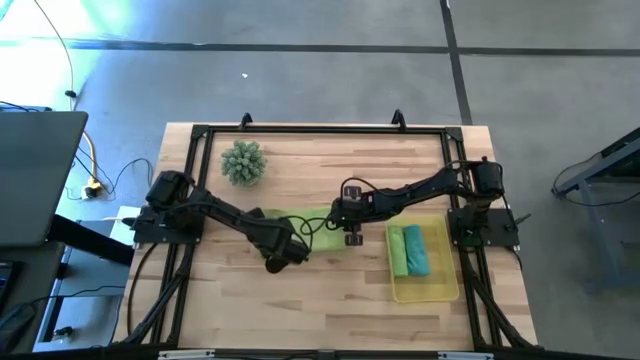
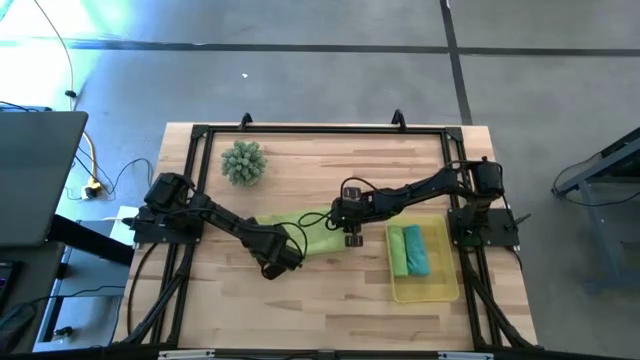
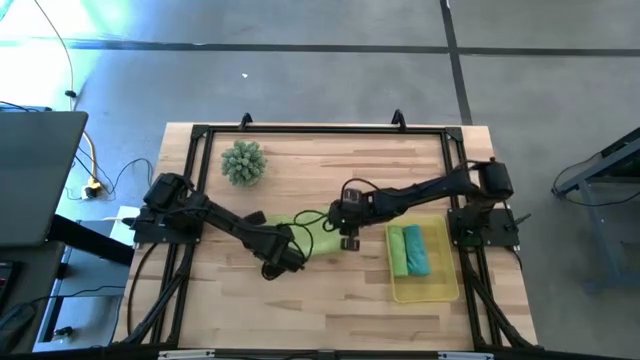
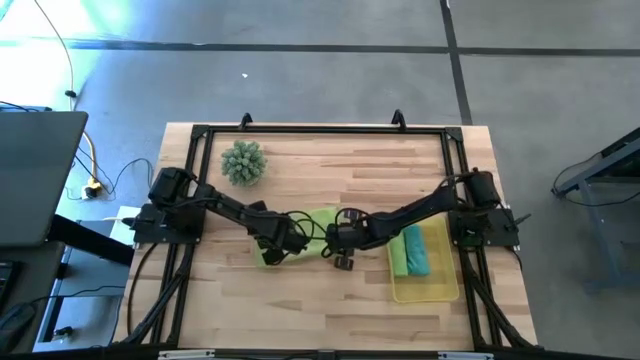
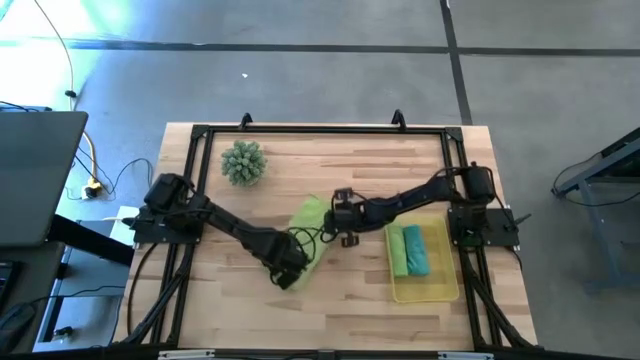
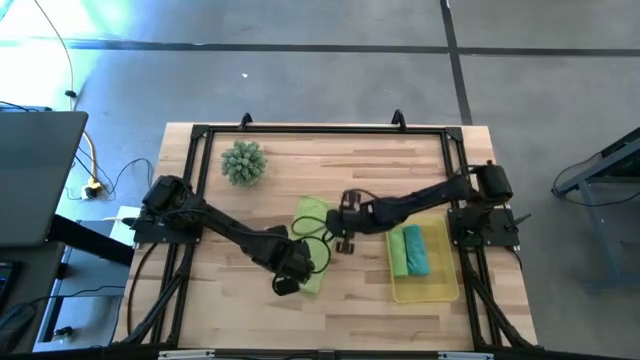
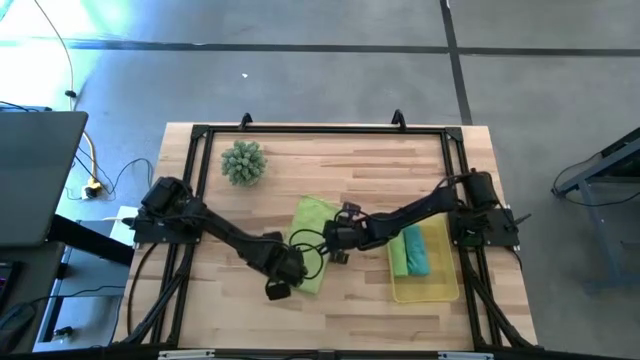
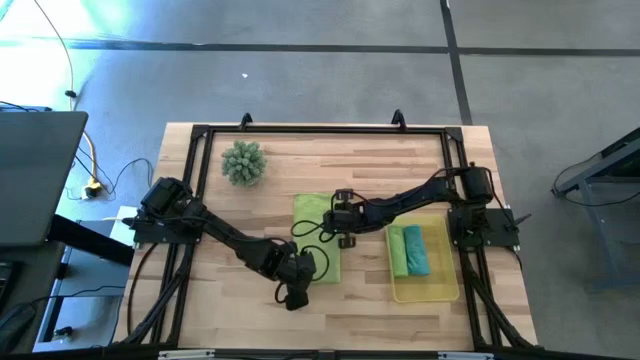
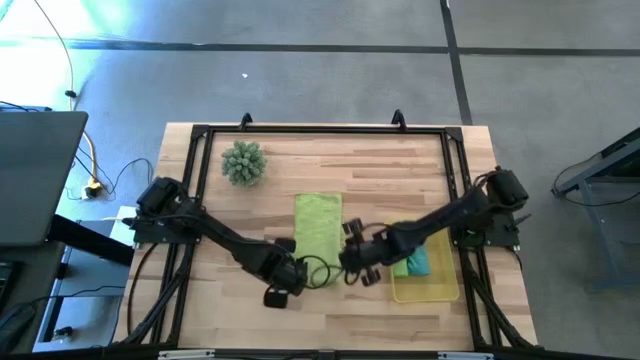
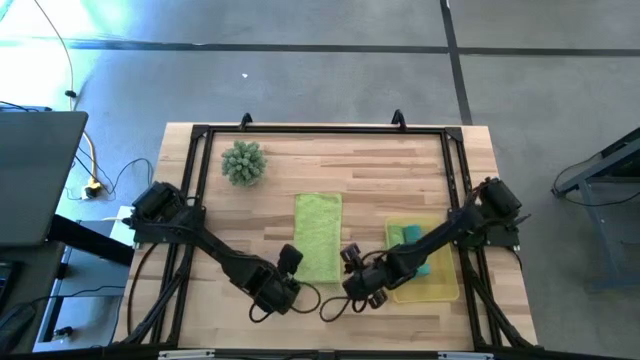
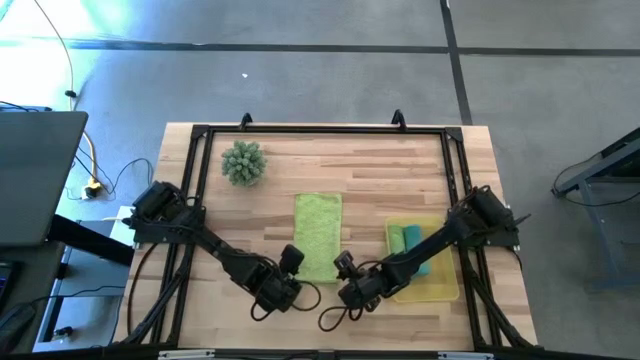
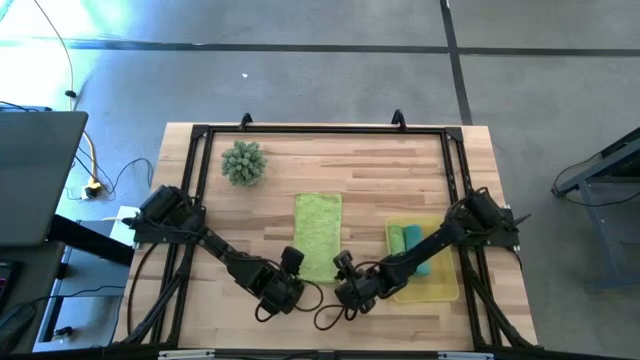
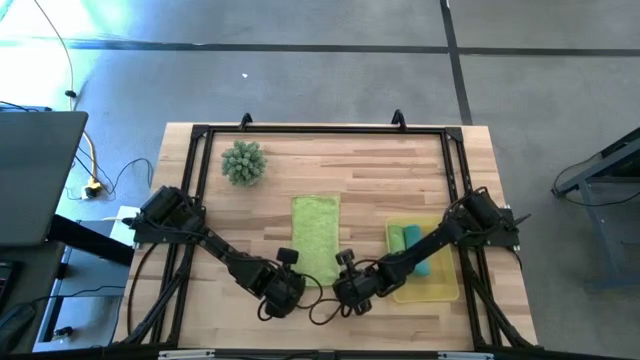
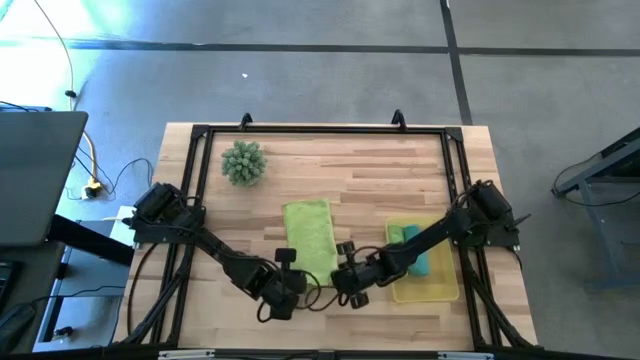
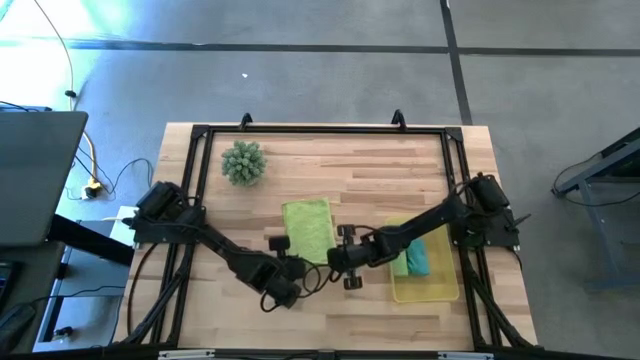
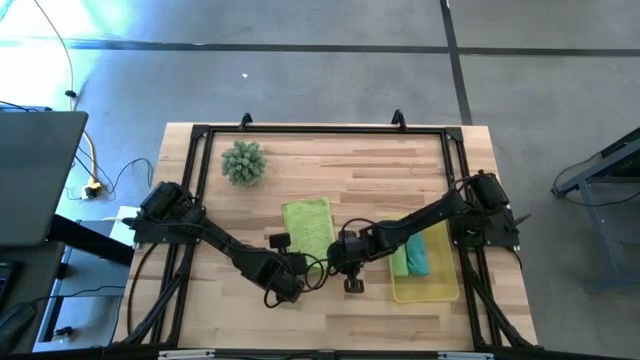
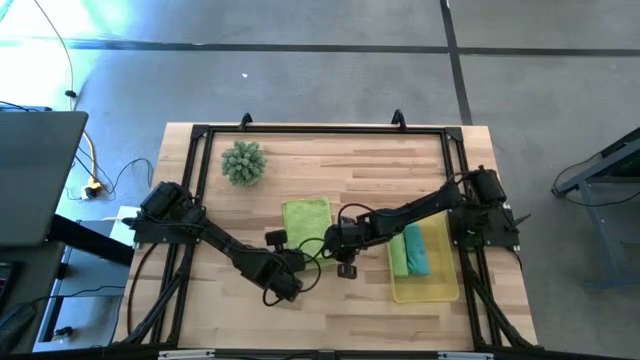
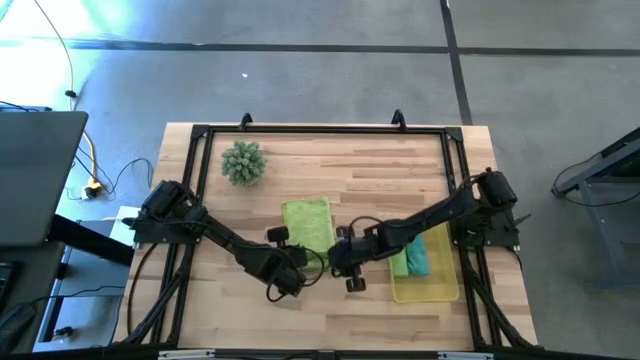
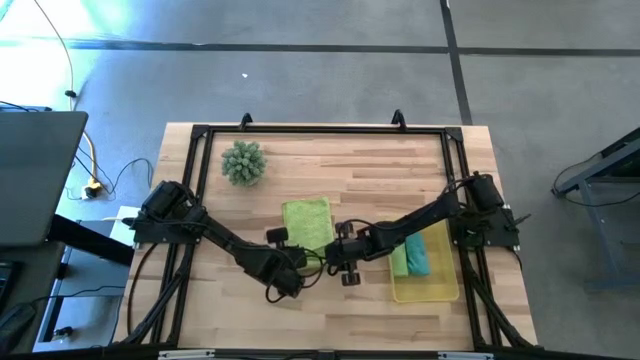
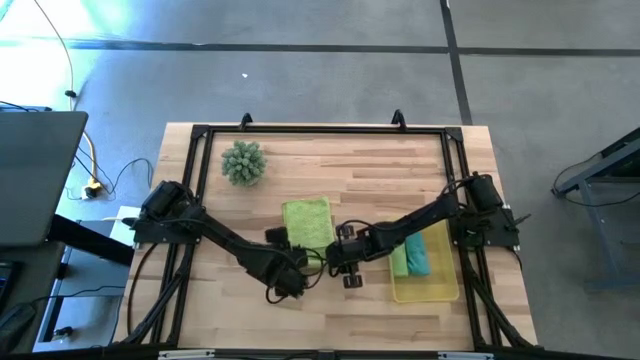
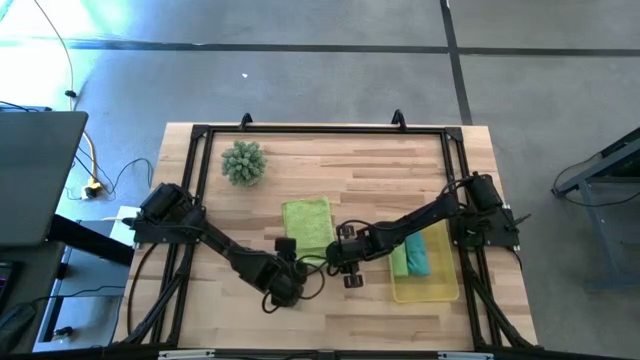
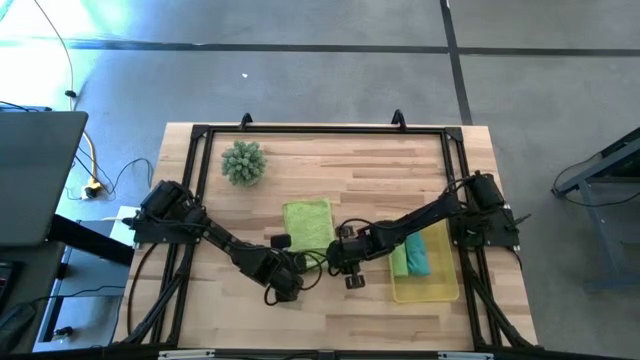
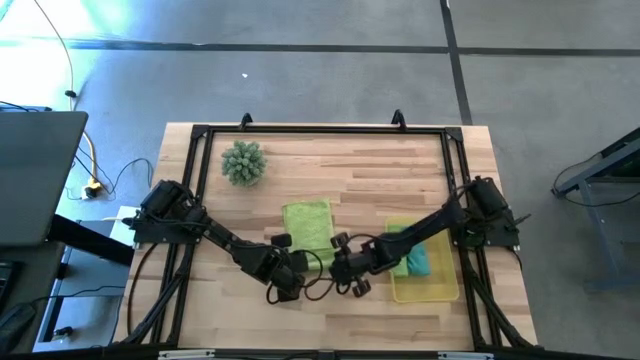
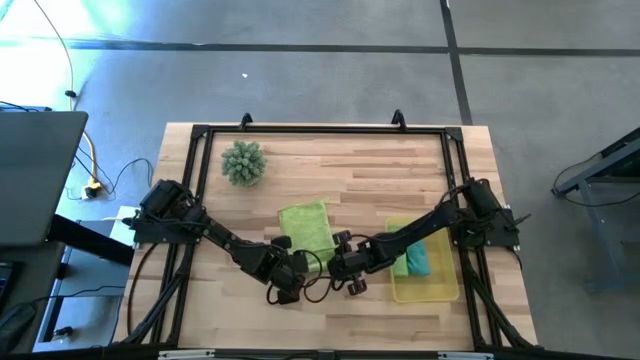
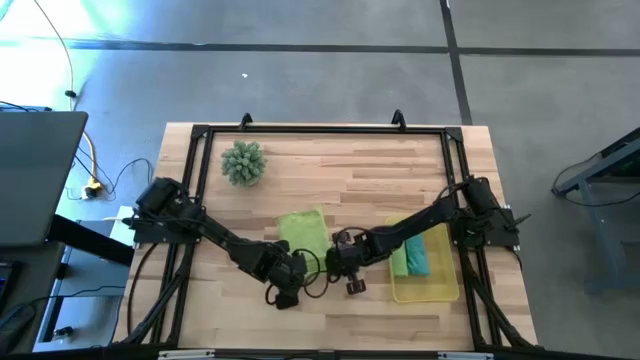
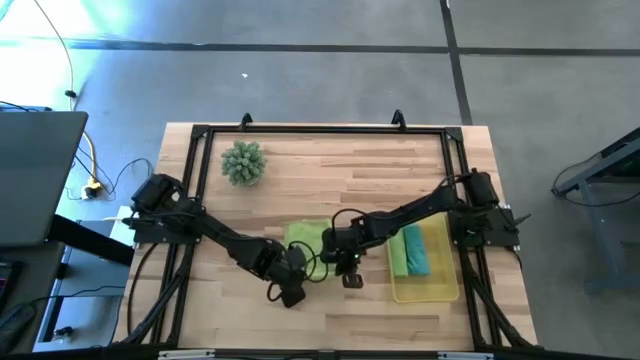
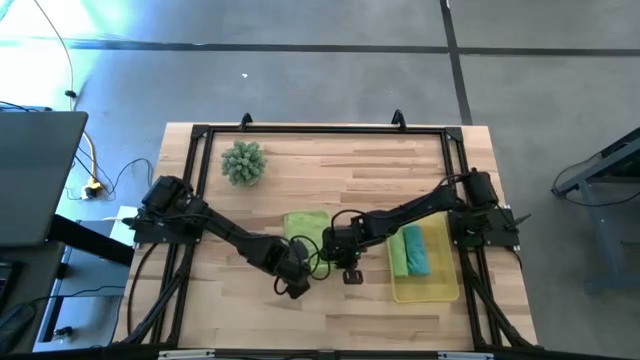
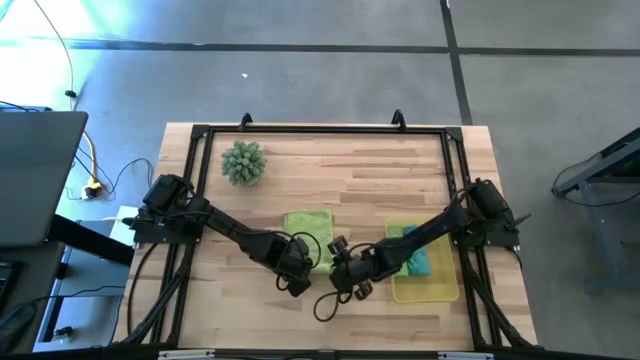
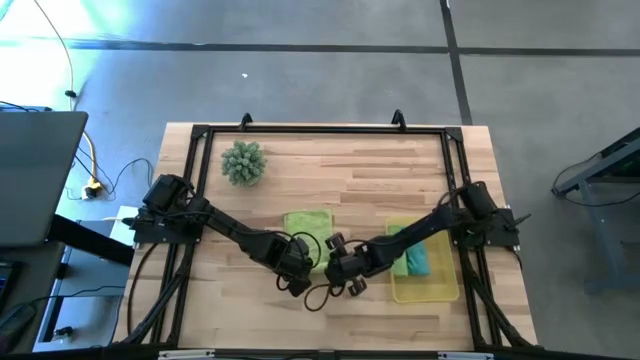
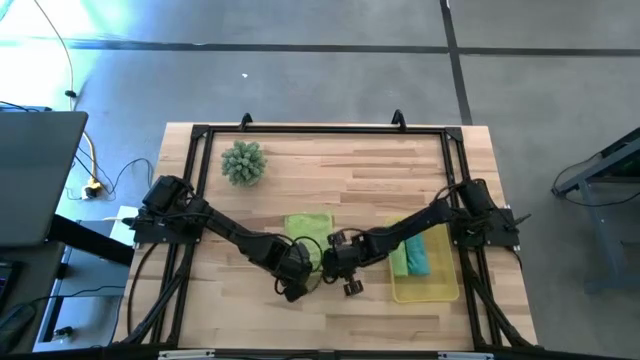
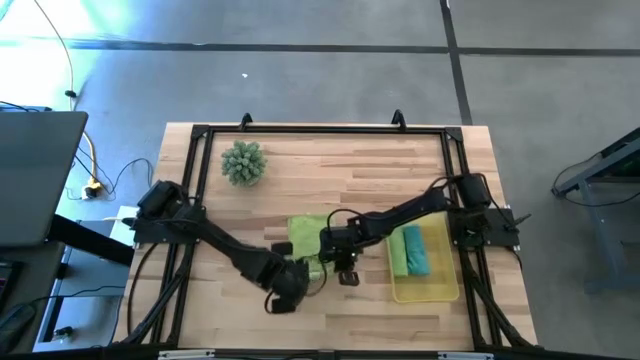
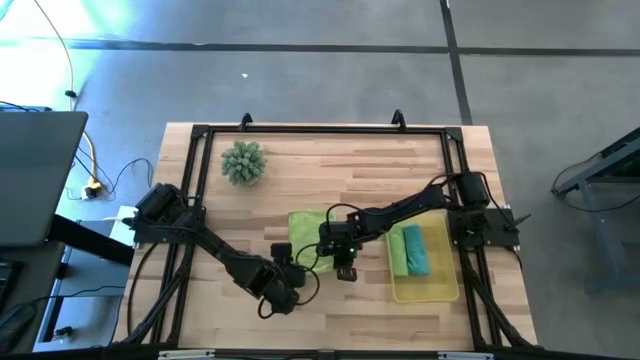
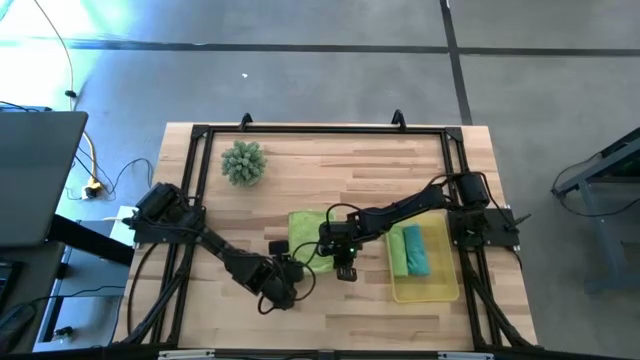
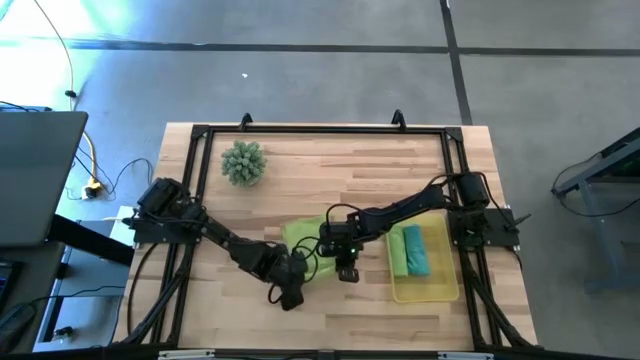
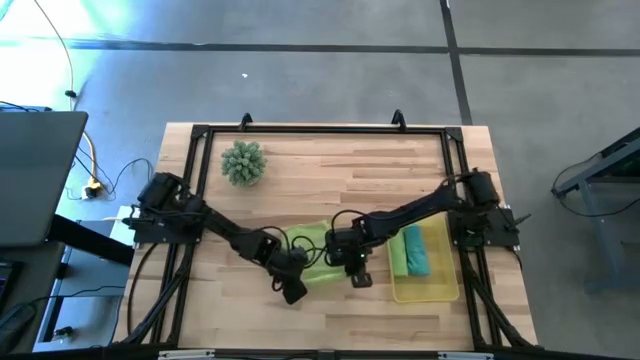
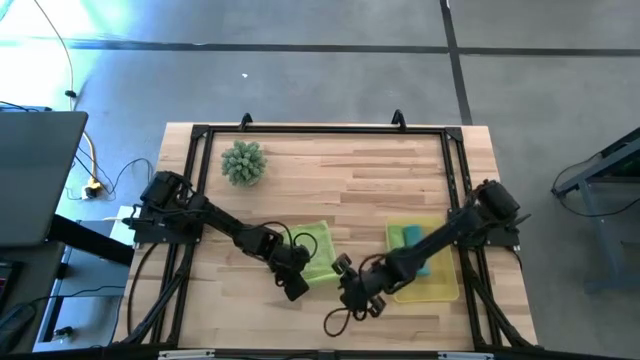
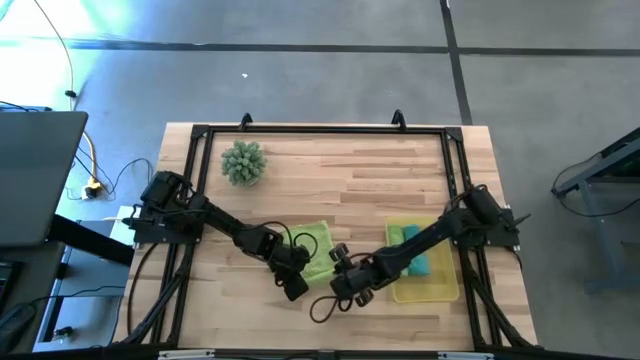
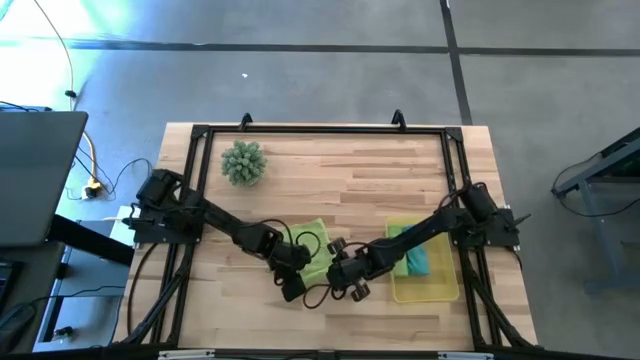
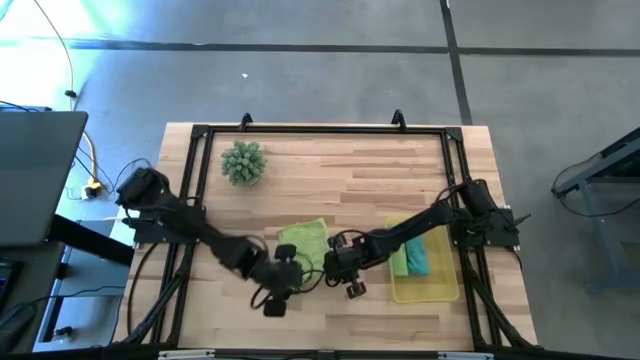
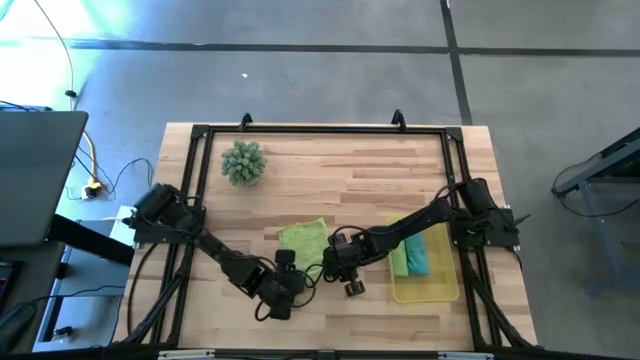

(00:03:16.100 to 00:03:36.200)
Task: Roll microfiber towels into tight, uniform cylinder then place into a basket
Roll the light green cloth

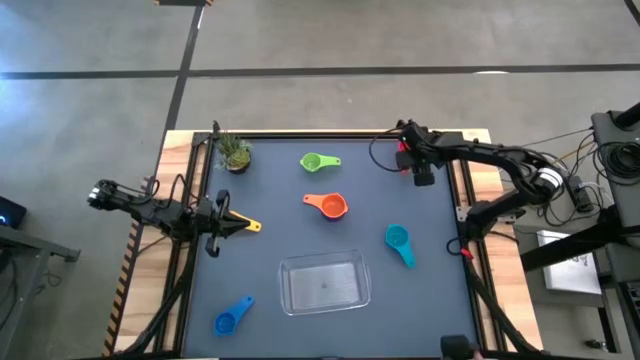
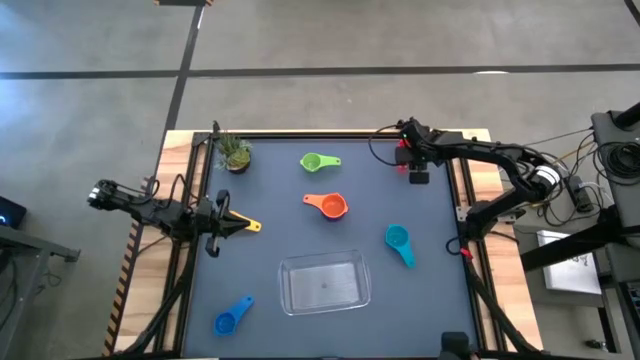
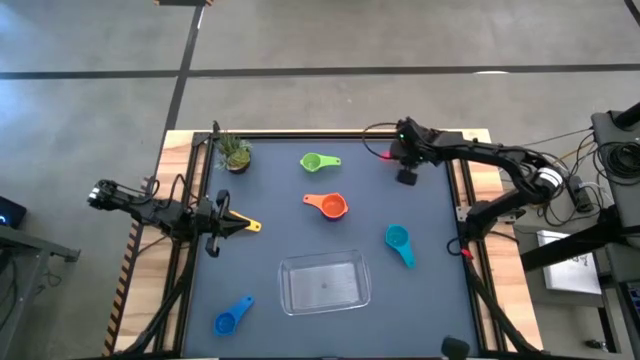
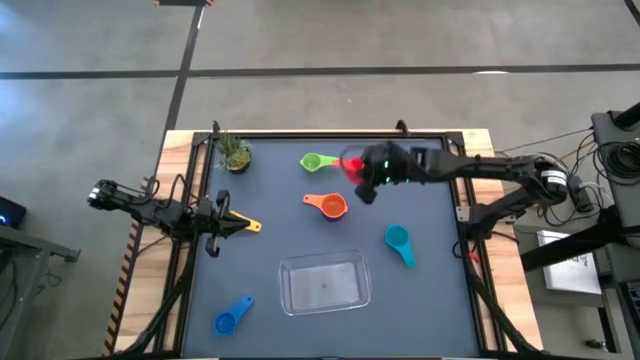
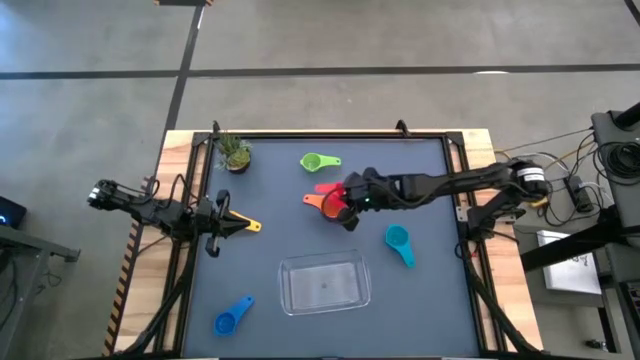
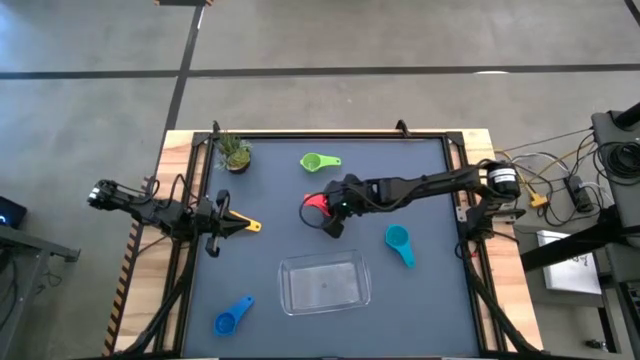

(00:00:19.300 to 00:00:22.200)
Task: Nest measuring cups in basket
Stack the red measuring cup on top of the orange measuring cup
